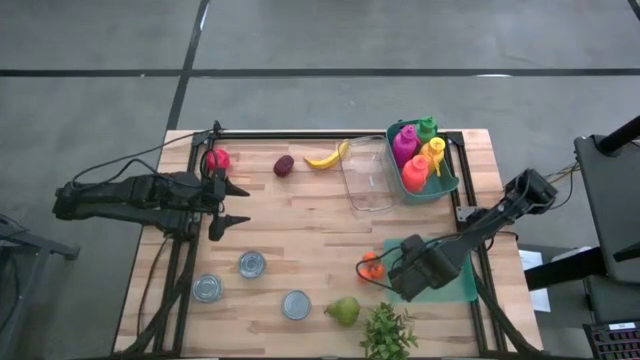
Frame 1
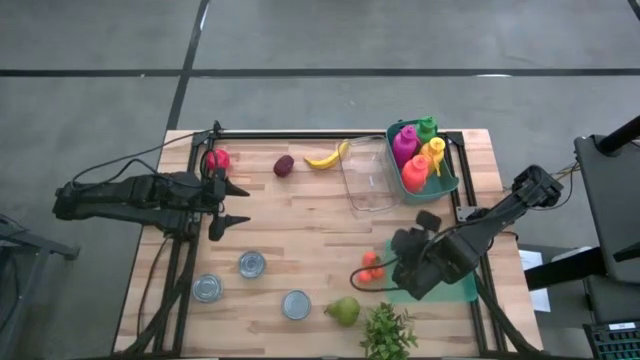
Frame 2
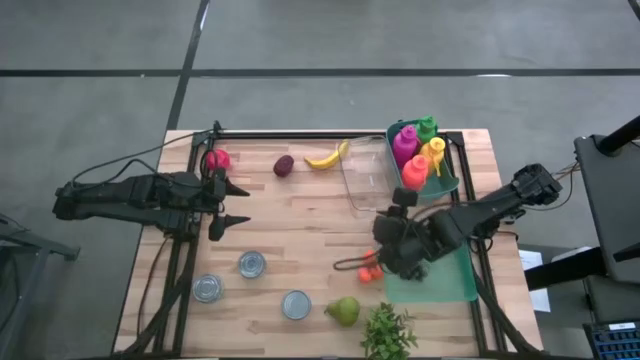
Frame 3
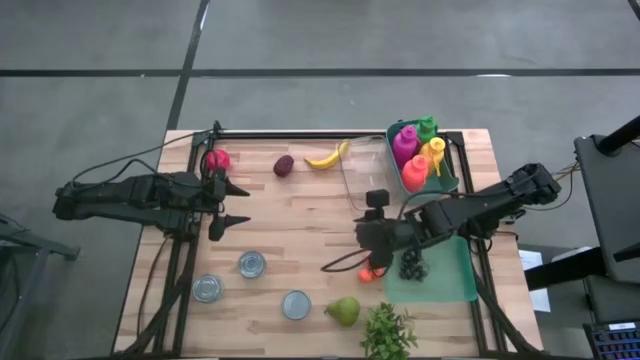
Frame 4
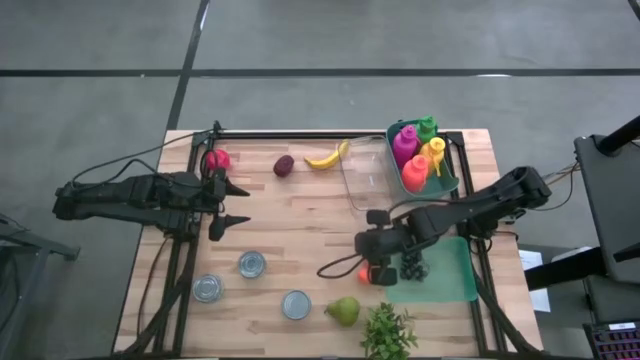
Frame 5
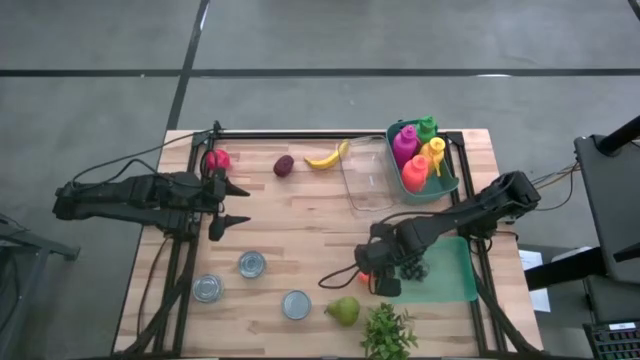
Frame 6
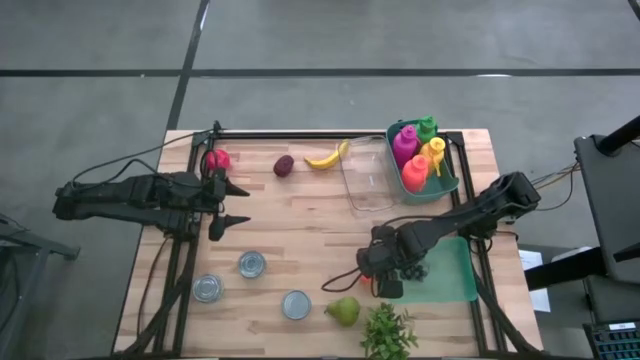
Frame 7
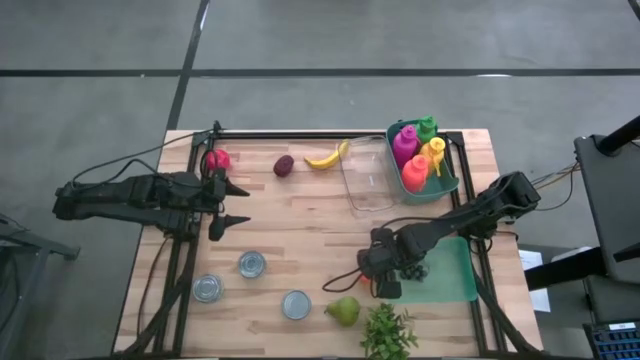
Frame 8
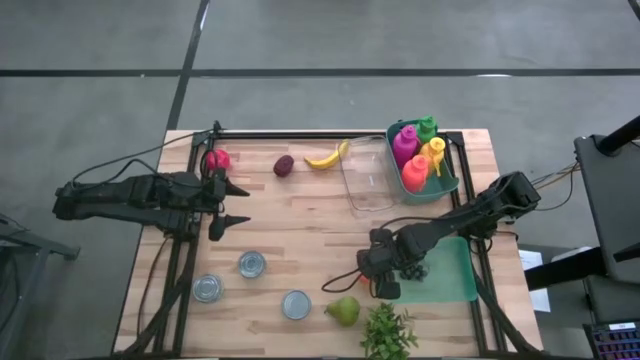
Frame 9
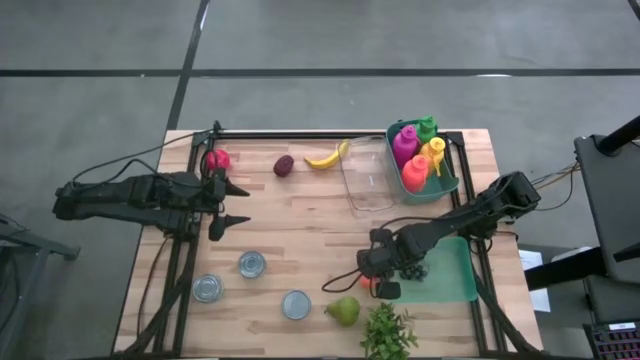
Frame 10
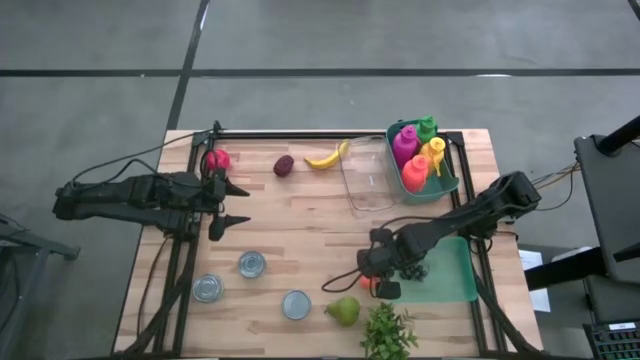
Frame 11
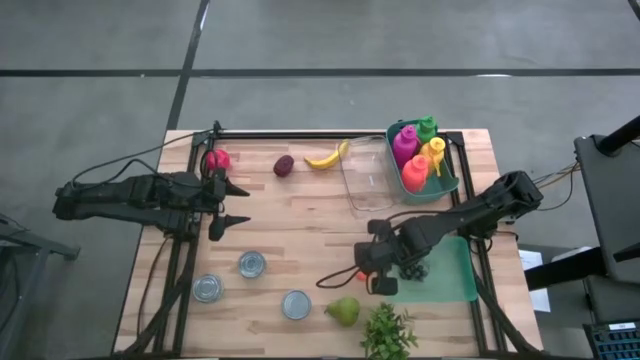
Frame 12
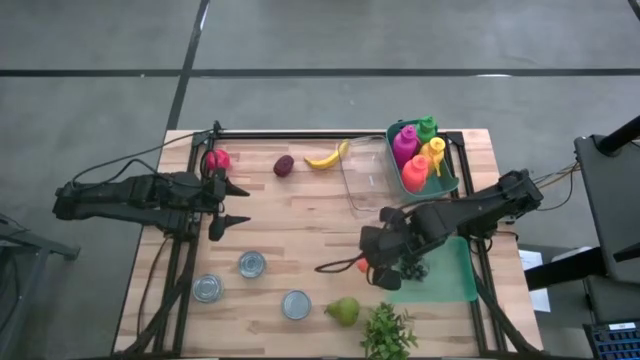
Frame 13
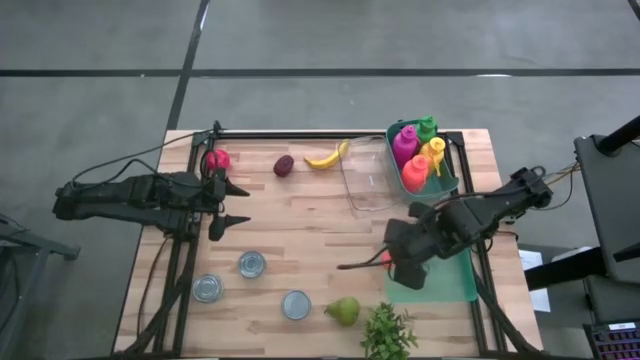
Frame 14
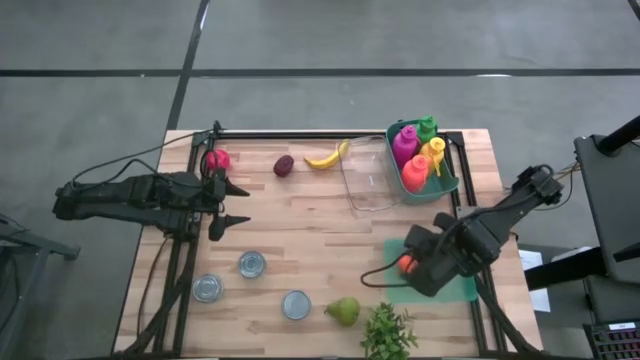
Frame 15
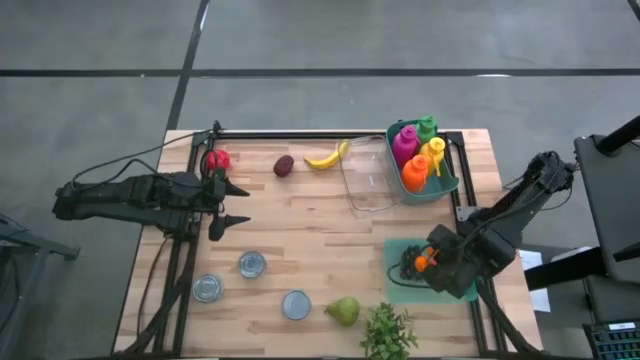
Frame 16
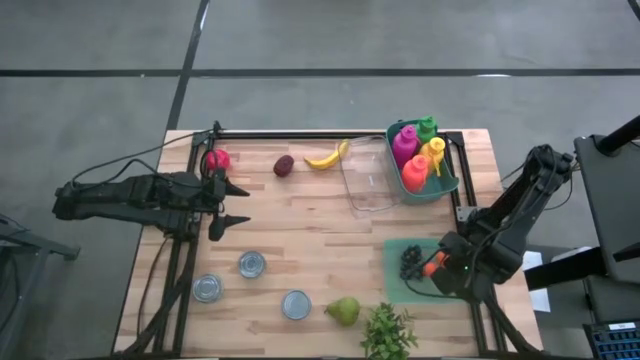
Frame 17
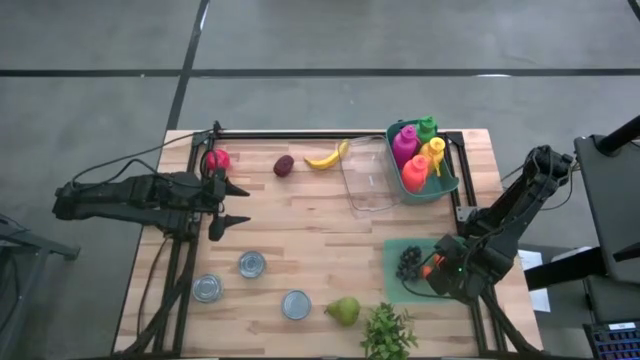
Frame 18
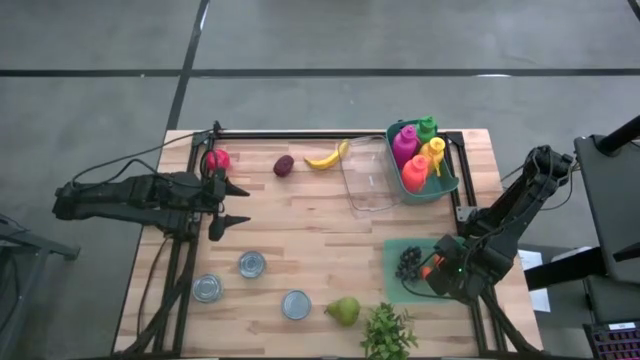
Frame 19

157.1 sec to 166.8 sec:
Task: Pick & Place Food Item
Put the tangerines into the green transparent bin

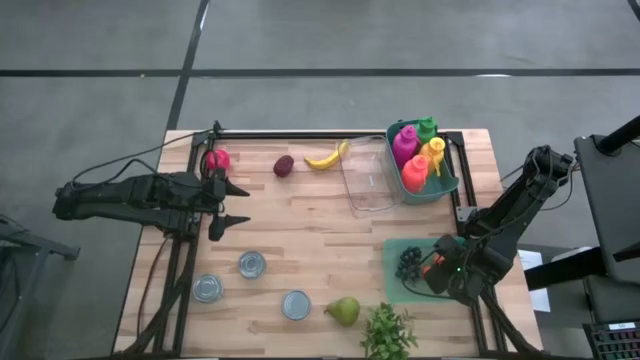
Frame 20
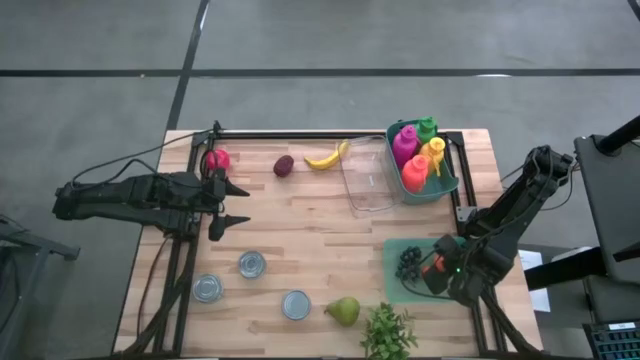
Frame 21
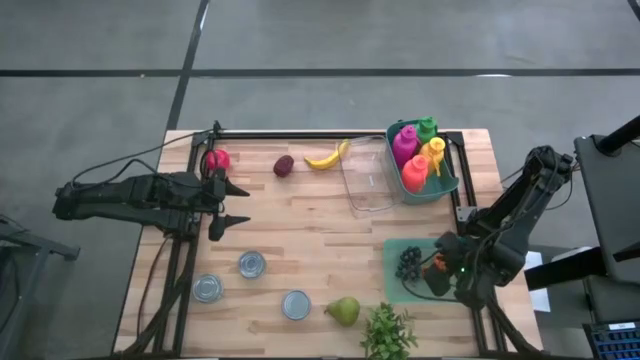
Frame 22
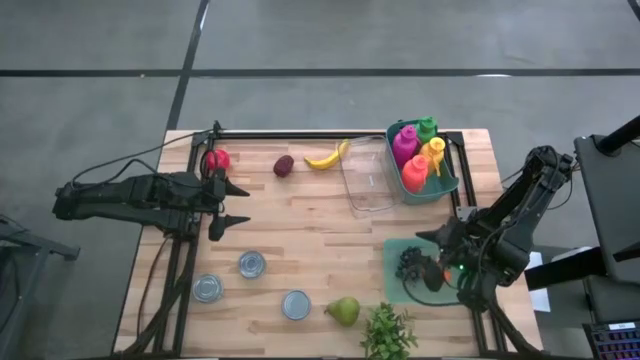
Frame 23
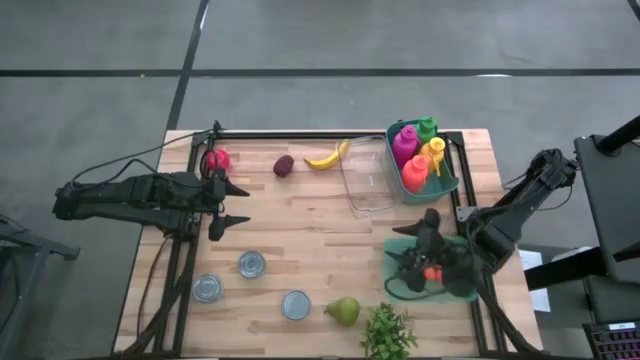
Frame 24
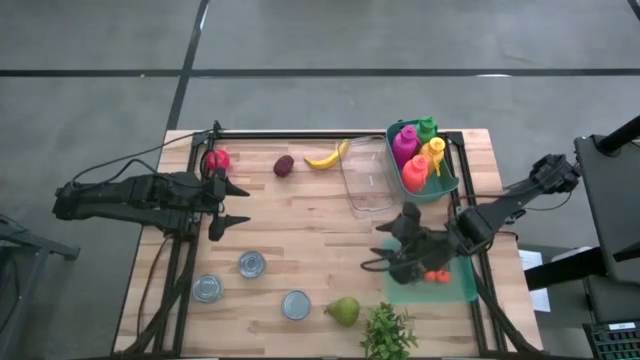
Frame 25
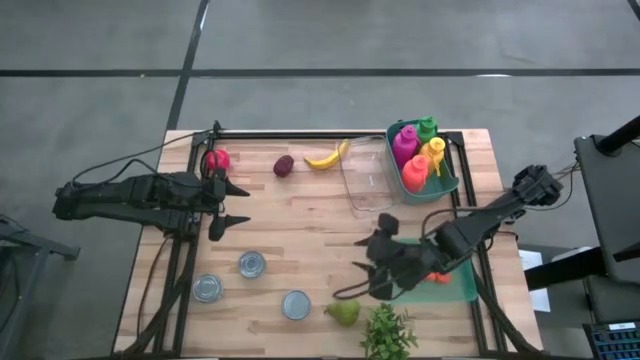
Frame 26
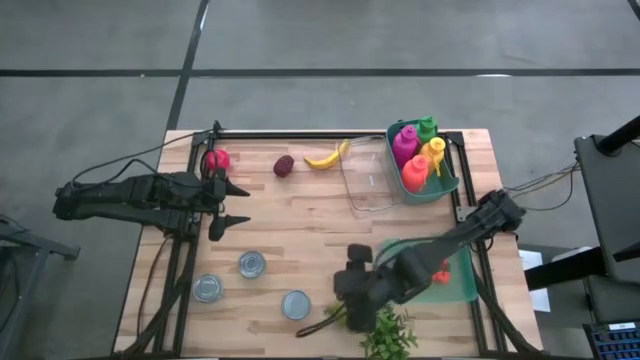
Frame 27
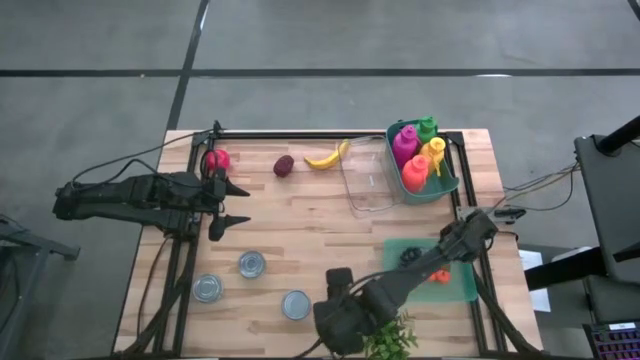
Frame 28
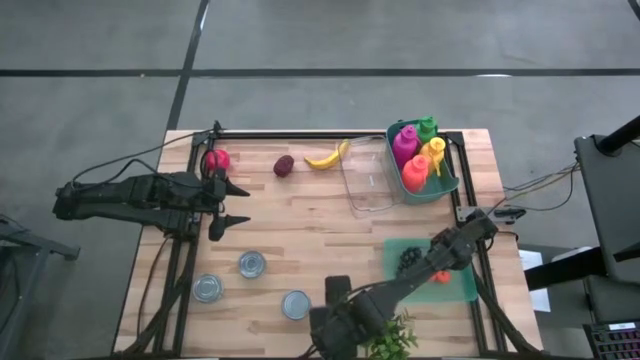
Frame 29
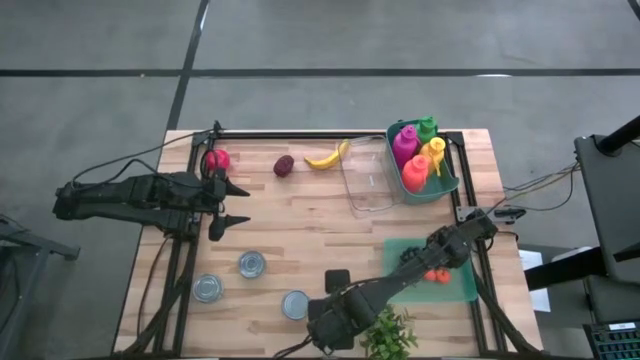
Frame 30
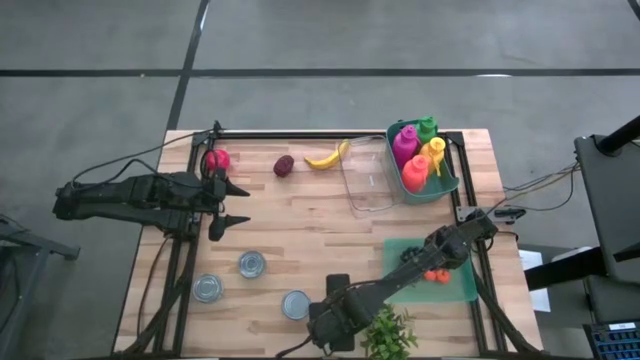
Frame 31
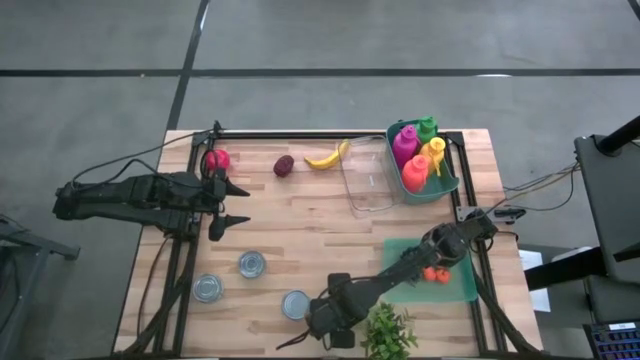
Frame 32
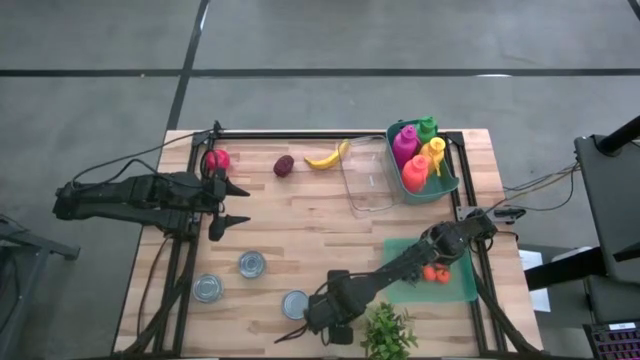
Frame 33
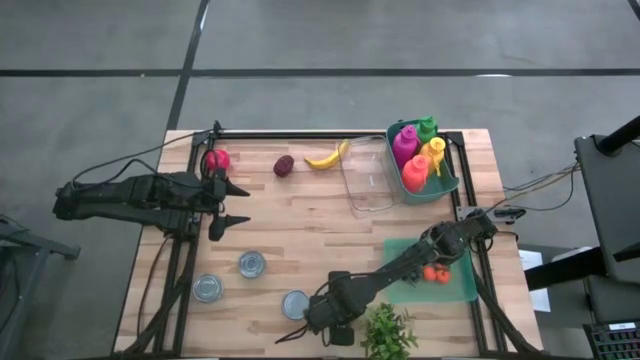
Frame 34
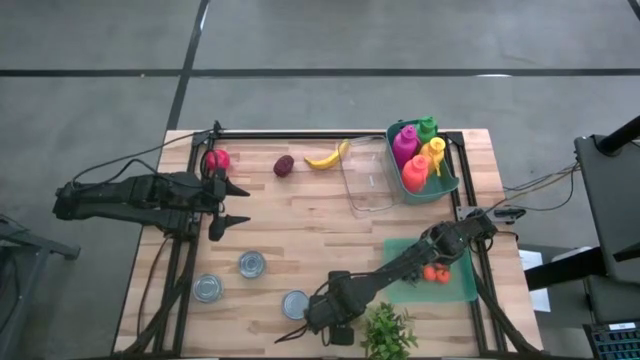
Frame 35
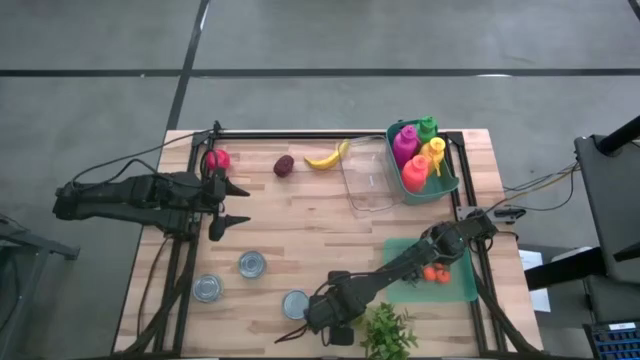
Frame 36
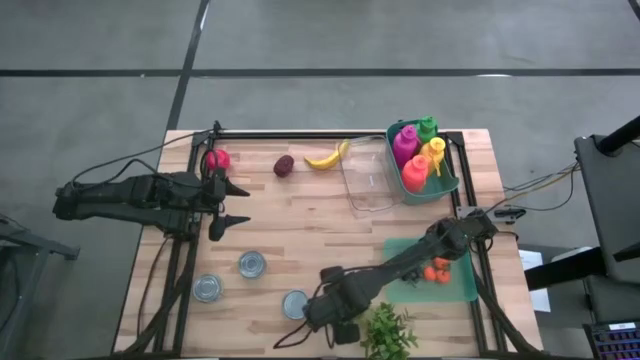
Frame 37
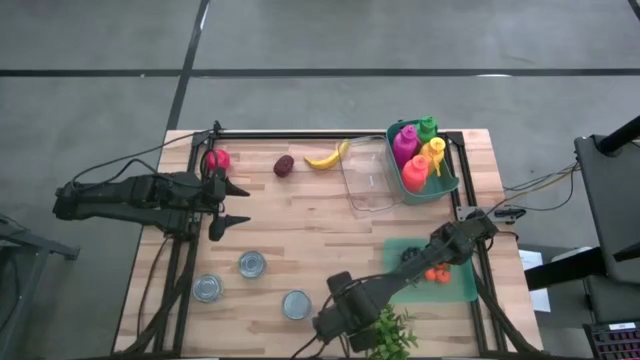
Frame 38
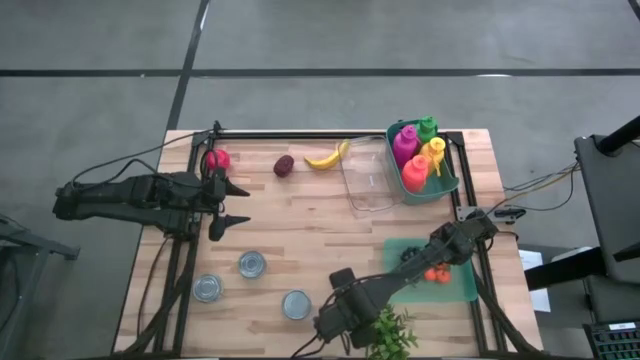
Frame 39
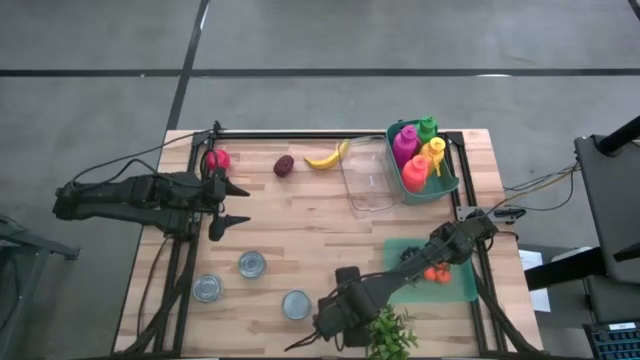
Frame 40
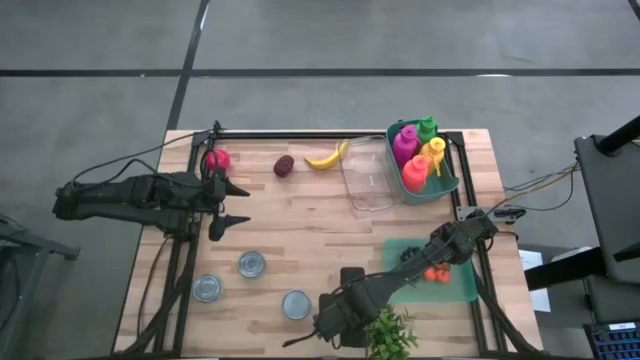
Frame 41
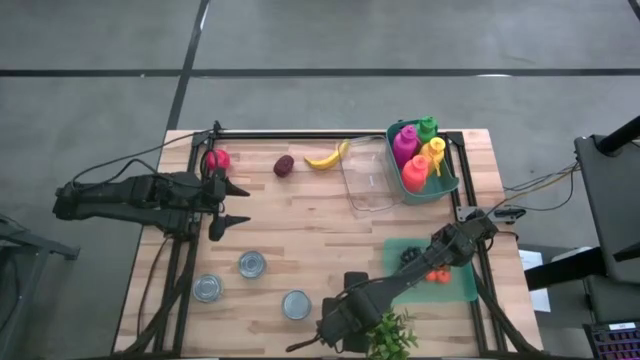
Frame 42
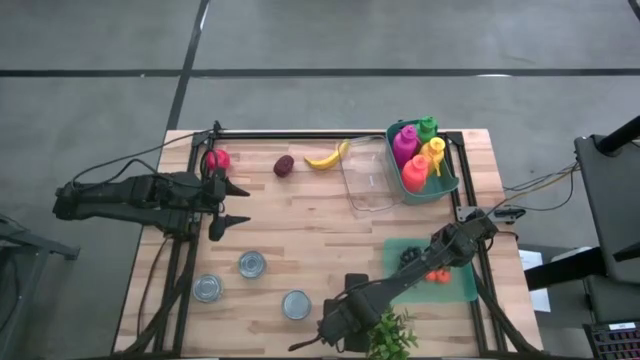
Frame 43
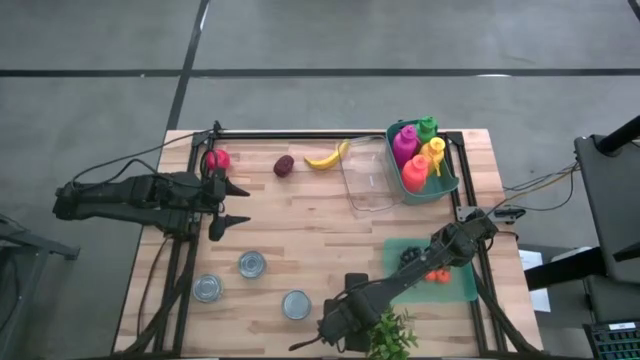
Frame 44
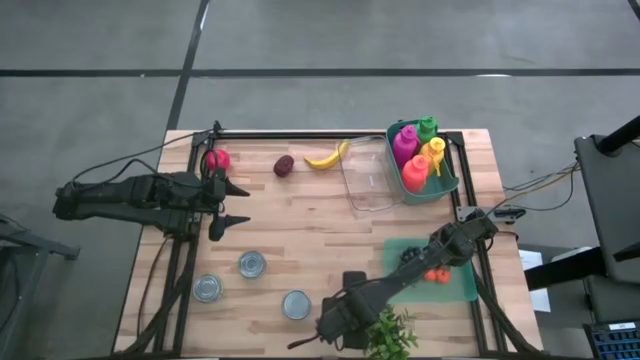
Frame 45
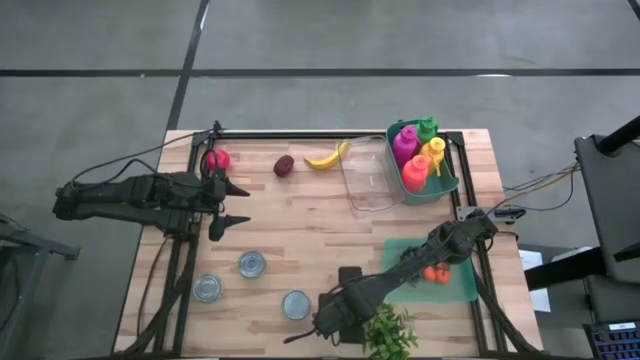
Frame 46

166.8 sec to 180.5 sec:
Put the pear into the green transparent bin
